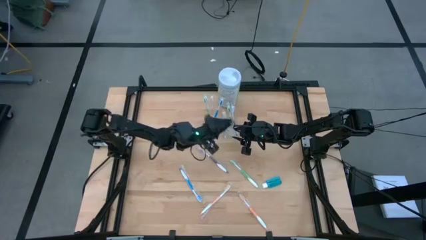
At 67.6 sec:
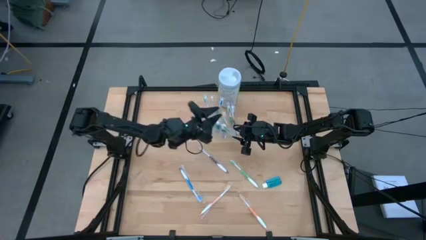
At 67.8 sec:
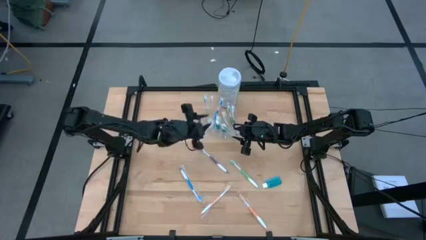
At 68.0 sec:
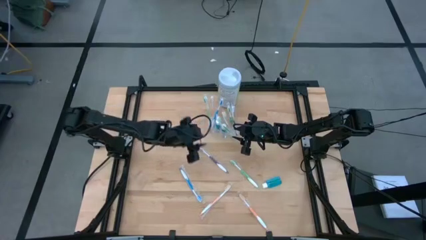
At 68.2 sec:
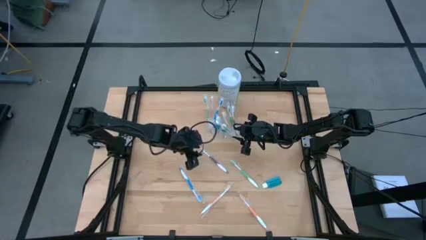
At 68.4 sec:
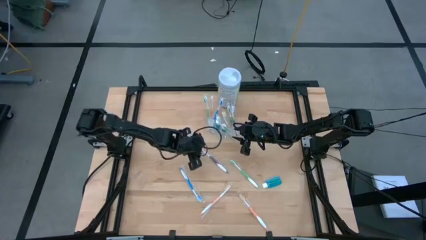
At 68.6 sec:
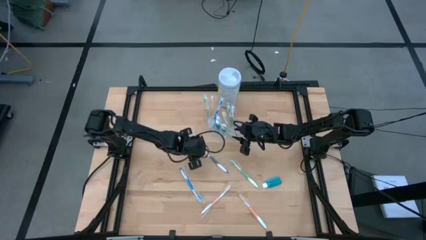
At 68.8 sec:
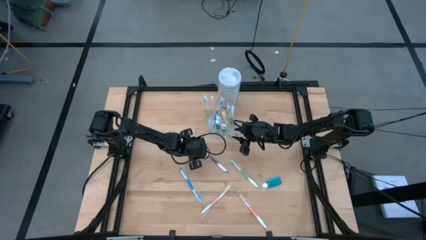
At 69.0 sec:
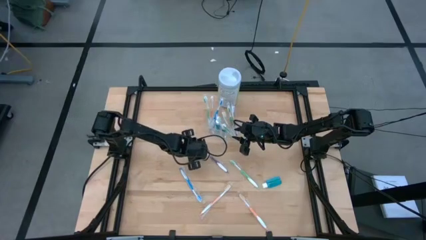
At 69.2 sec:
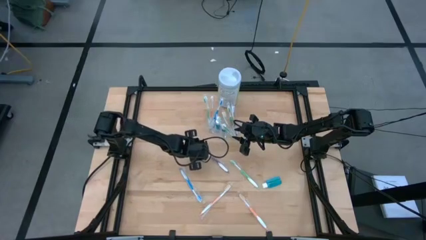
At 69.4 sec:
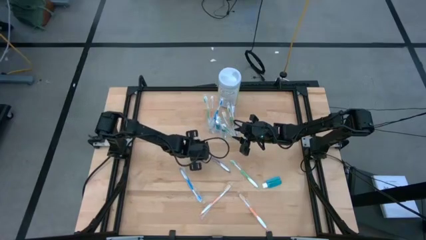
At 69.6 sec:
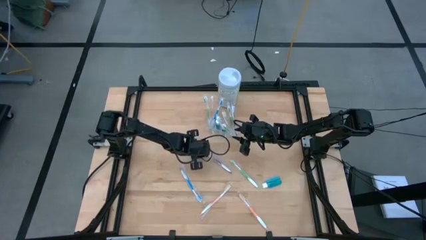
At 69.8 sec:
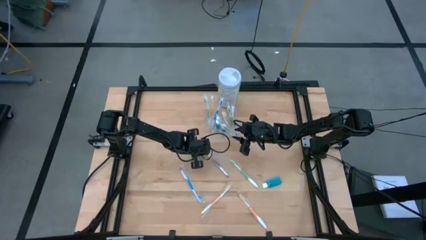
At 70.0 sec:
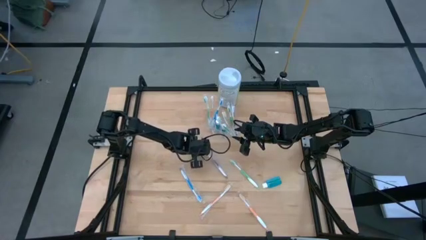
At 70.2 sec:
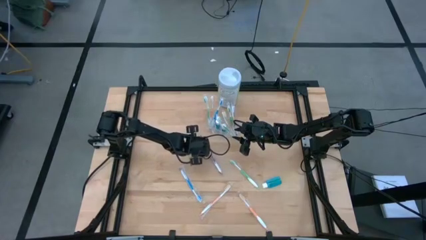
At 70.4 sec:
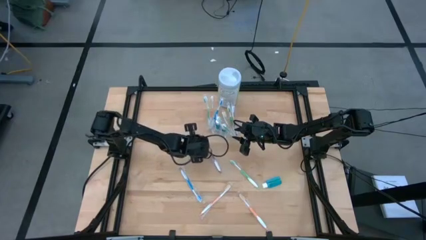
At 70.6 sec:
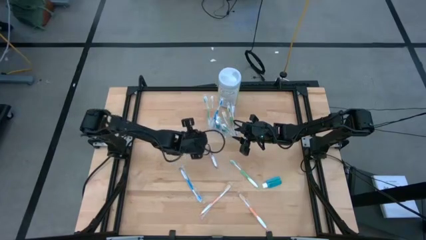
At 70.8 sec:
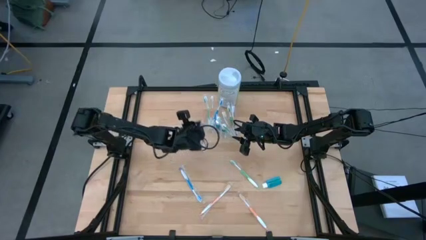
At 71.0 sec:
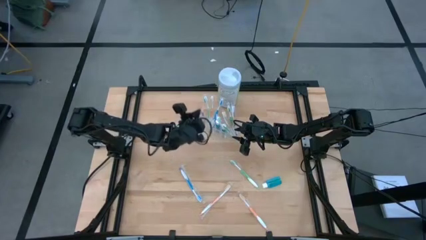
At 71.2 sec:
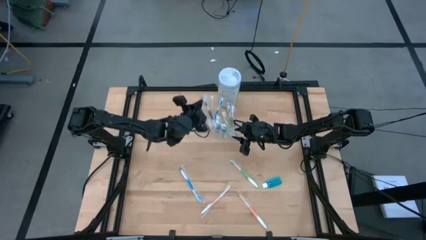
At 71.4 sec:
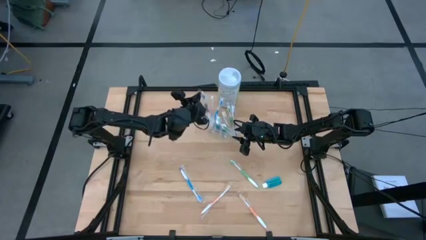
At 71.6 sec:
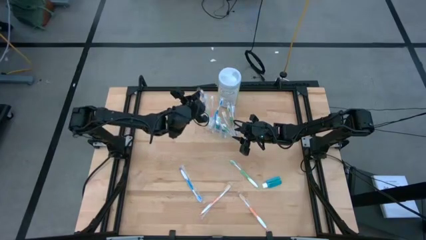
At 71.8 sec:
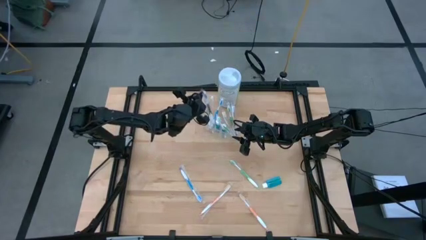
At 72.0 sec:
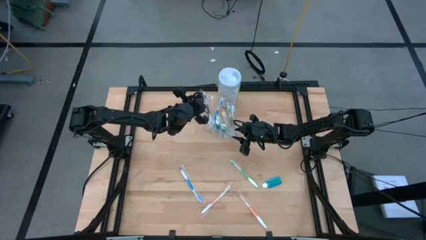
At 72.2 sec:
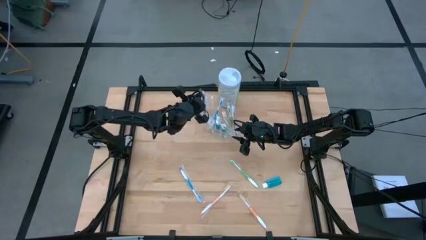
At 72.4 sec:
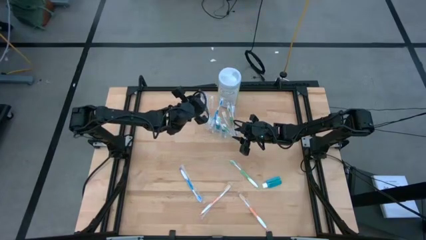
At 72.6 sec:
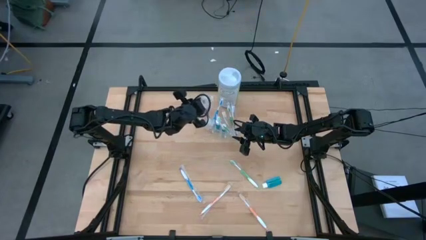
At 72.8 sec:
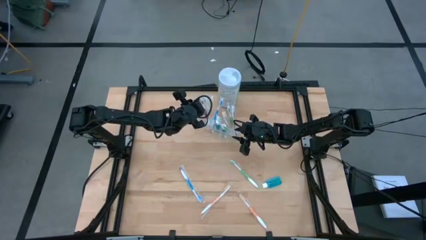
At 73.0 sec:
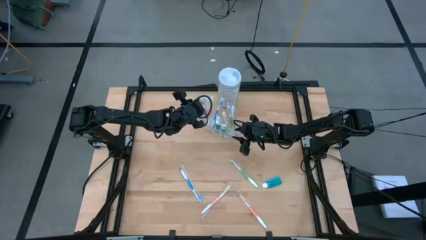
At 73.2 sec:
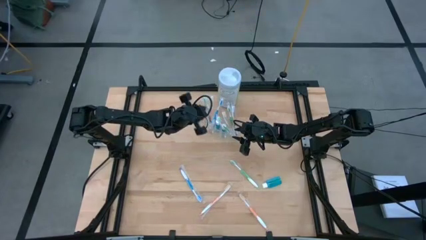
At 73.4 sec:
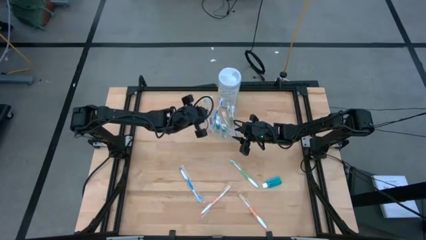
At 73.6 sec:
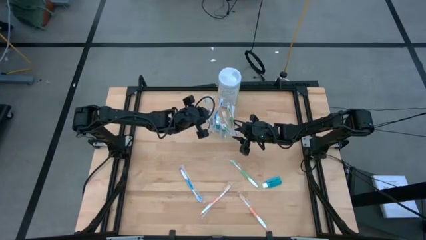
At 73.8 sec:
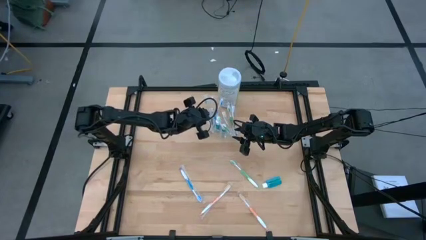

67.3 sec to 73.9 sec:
Task: Pick & Place toothbrushing station
Put the violet toothbrush into the transparent organizer

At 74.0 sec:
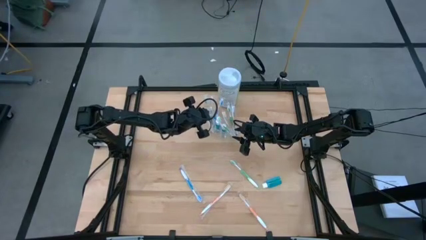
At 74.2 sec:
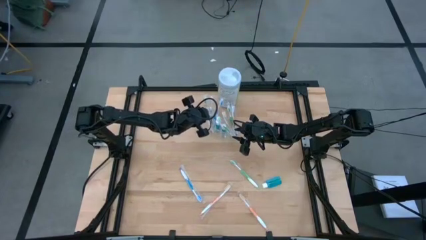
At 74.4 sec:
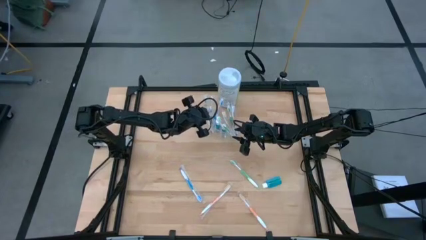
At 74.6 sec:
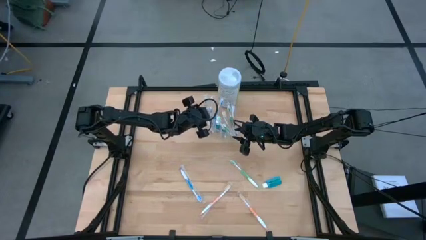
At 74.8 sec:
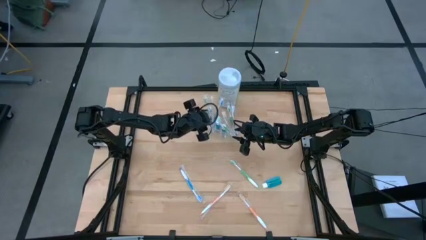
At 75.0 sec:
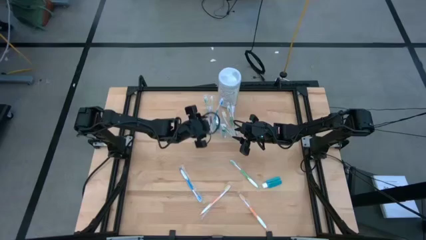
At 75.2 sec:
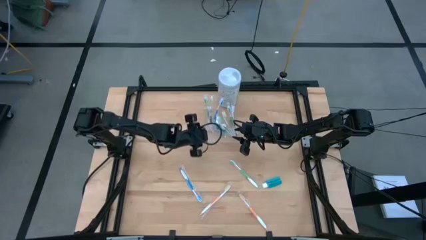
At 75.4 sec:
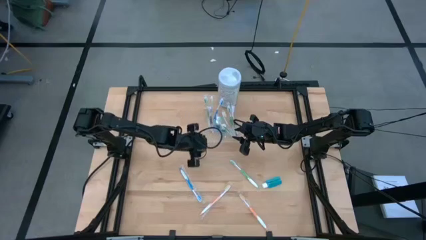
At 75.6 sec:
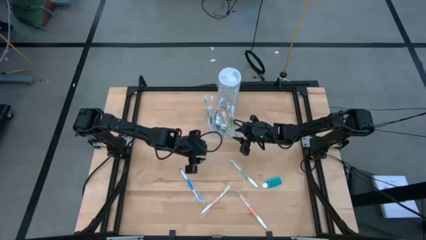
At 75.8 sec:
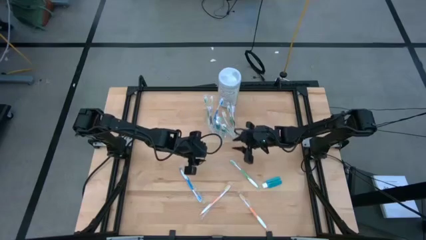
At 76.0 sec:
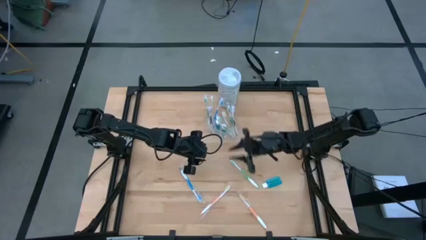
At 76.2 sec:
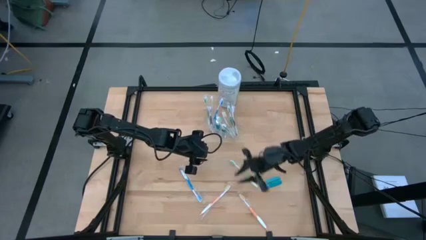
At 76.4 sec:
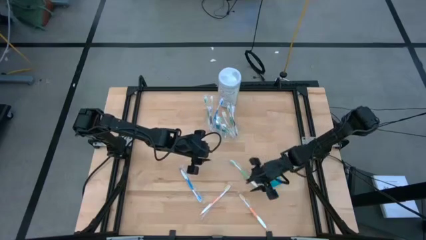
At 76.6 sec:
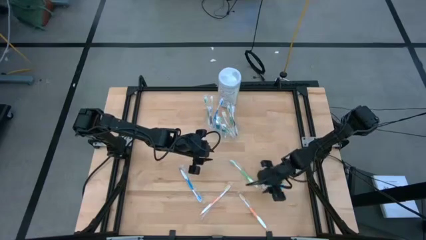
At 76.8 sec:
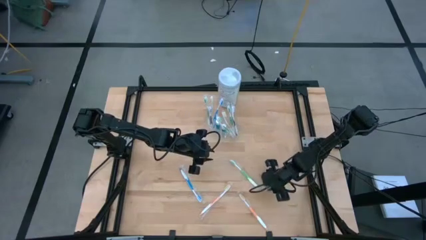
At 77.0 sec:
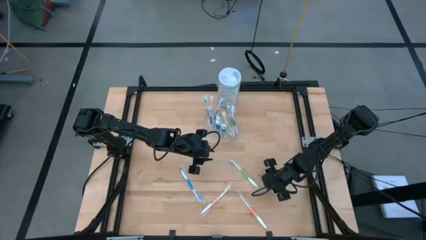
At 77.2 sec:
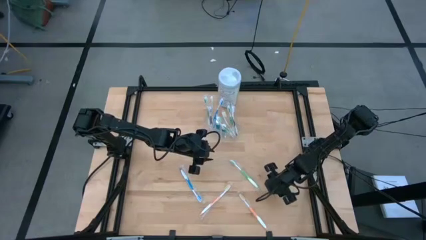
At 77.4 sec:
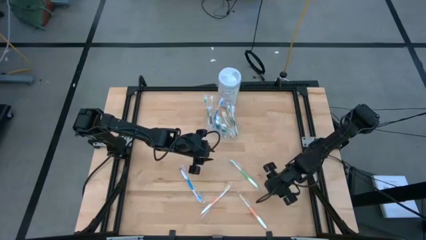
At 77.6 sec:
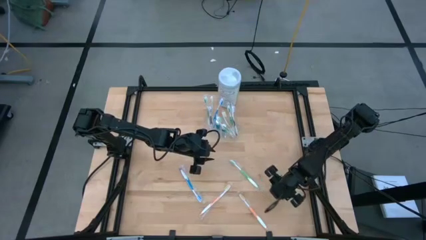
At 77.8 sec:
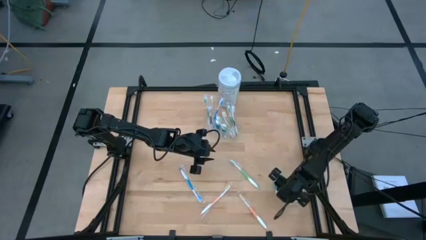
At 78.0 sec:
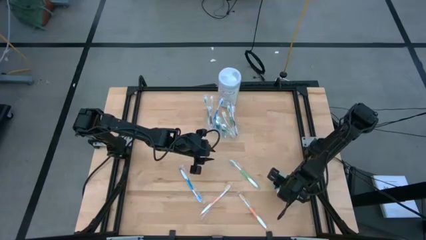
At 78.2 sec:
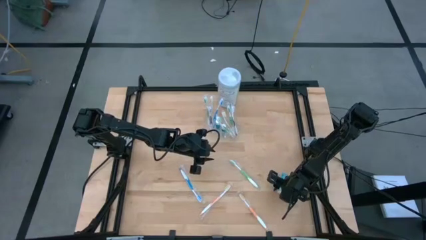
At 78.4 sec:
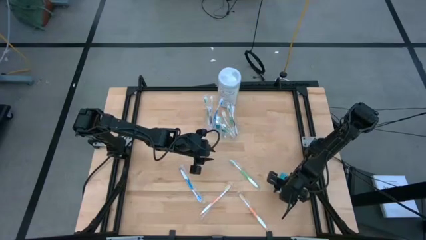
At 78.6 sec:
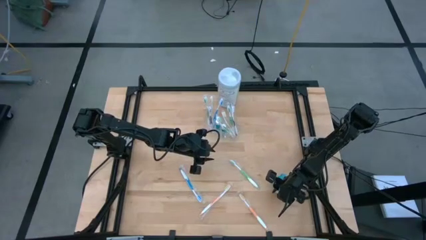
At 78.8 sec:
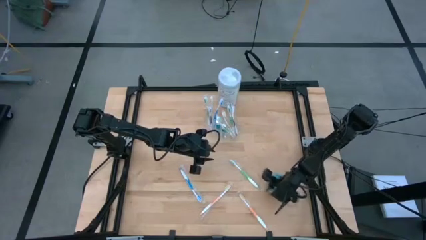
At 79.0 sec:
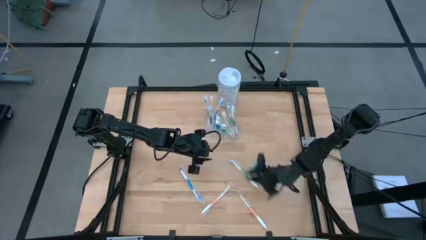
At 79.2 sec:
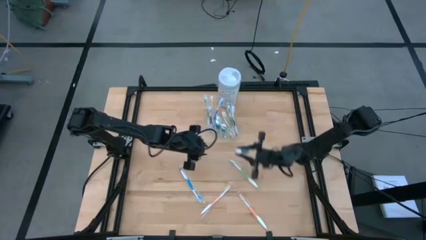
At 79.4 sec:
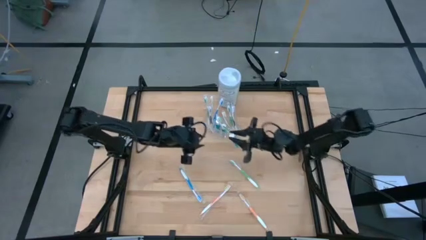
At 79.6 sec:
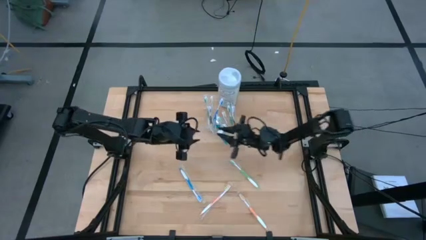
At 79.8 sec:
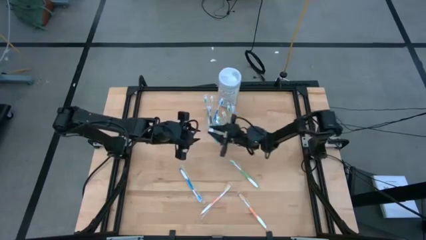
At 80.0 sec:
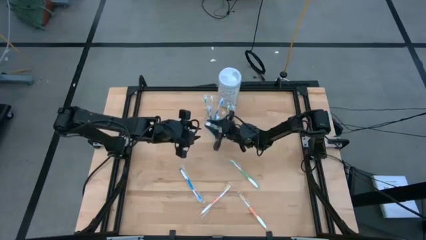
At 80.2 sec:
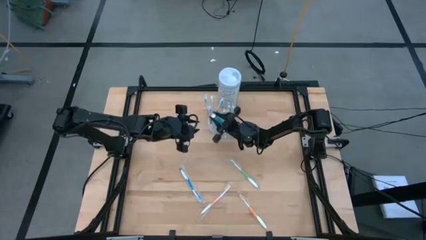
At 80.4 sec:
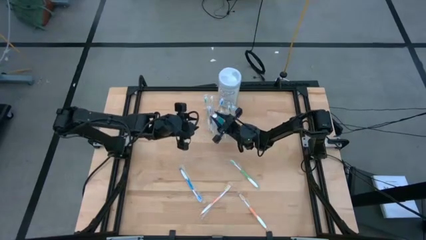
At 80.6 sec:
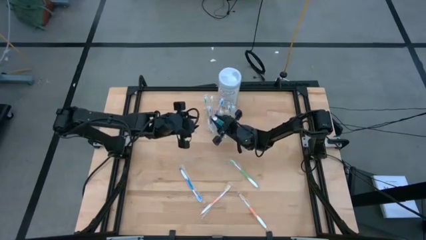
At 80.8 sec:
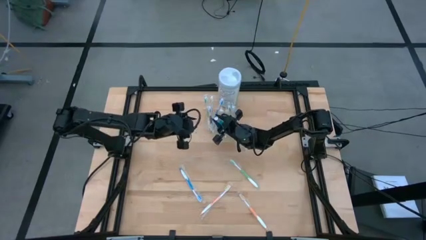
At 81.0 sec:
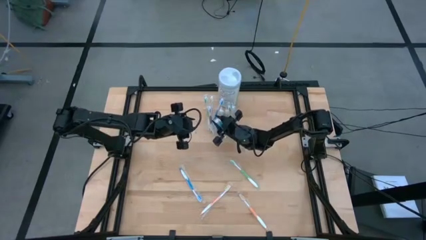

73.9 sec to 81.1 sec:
Put the blue mouthwash into the transparent organizer
